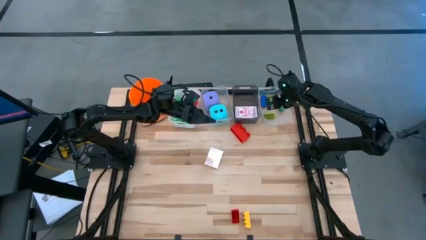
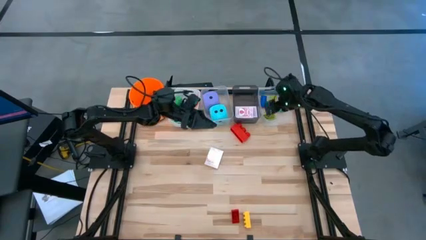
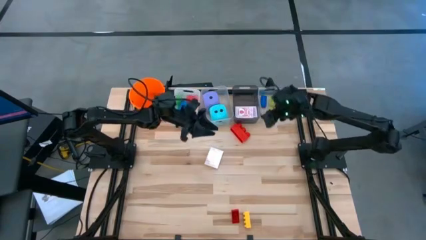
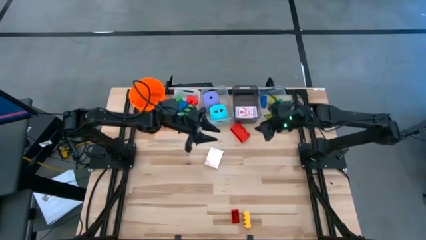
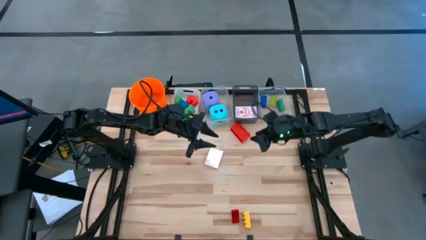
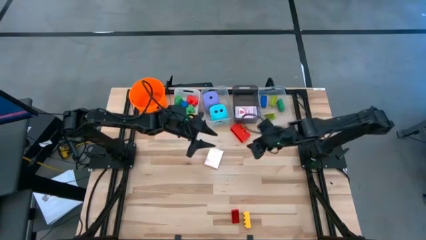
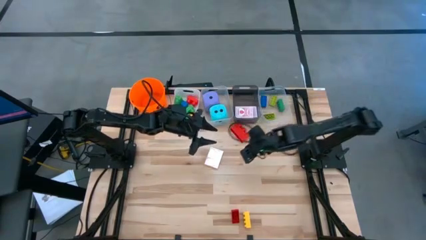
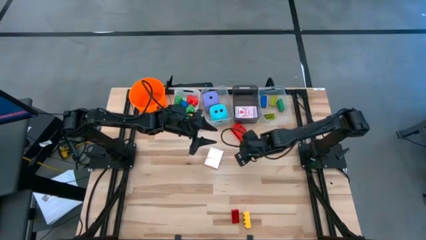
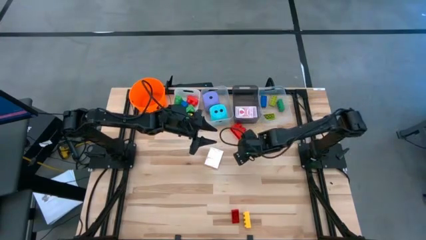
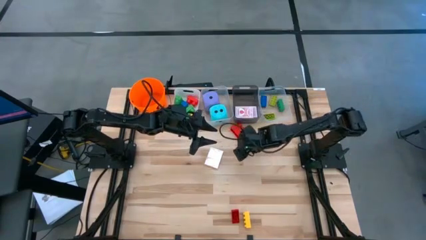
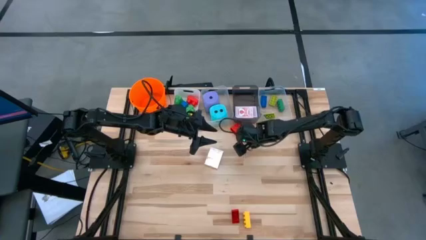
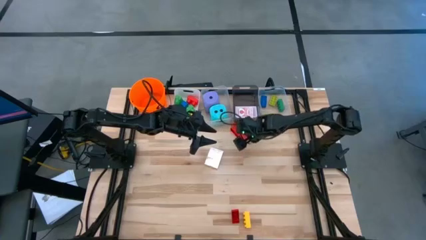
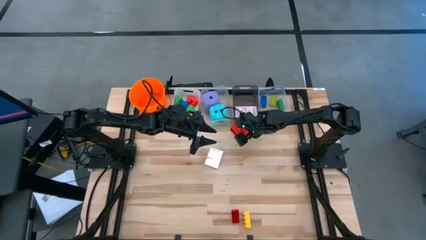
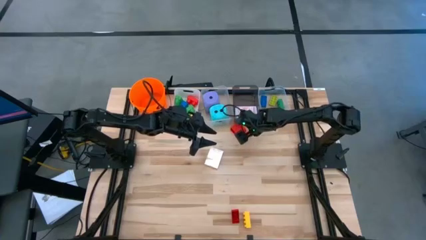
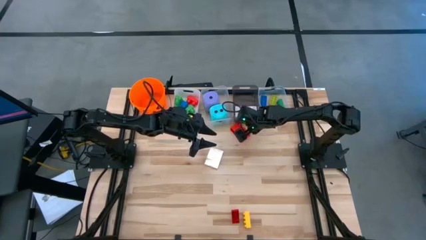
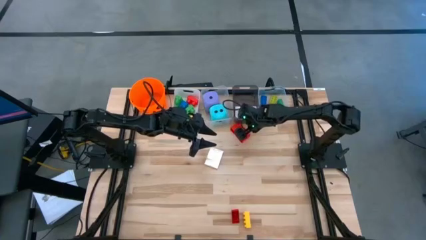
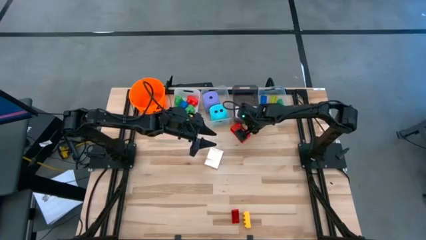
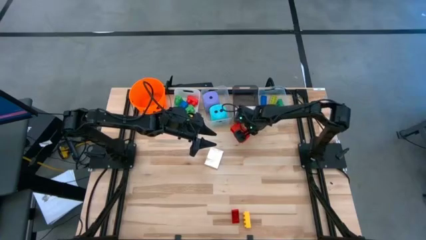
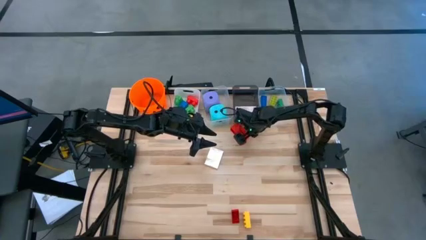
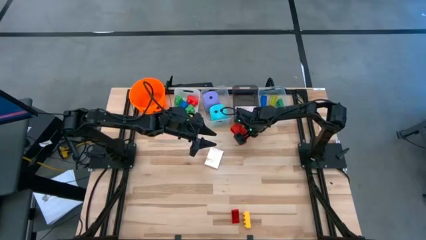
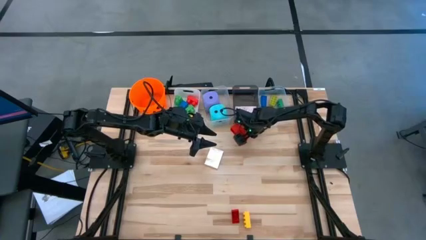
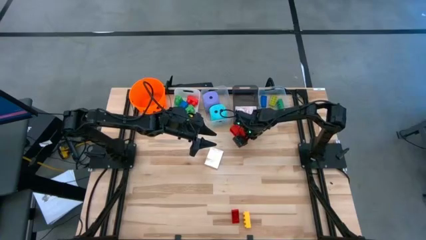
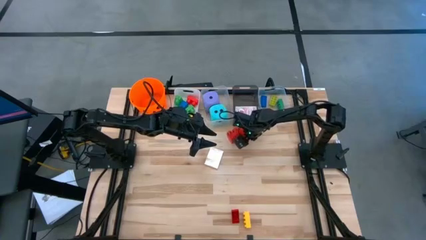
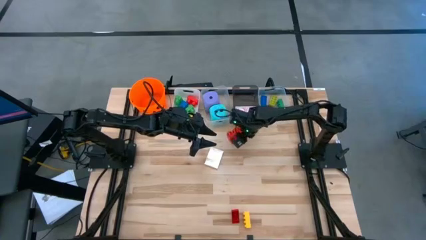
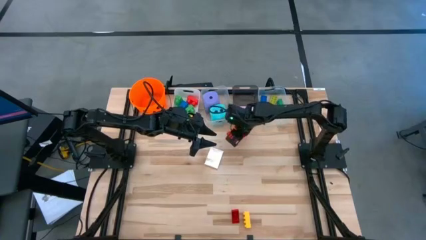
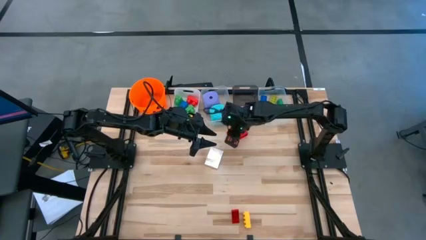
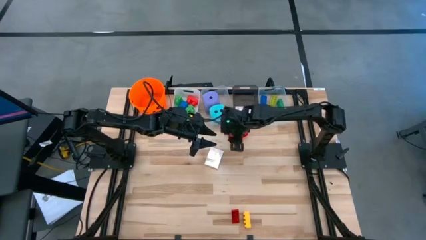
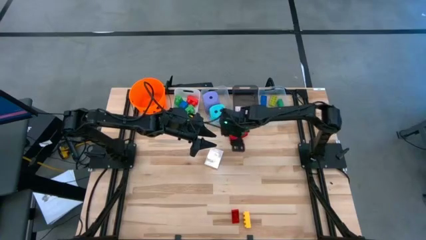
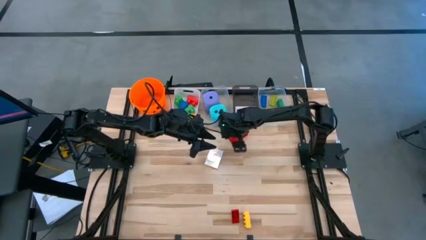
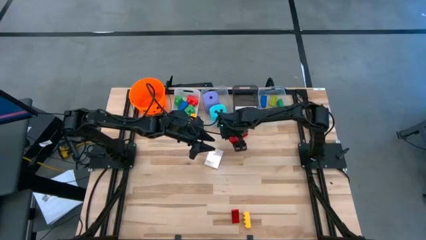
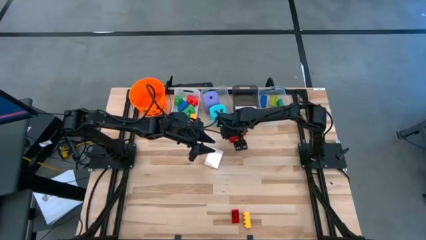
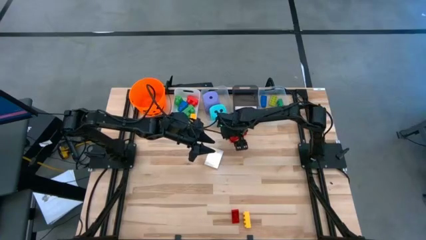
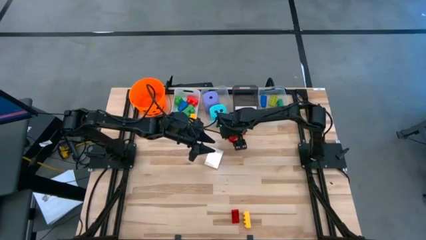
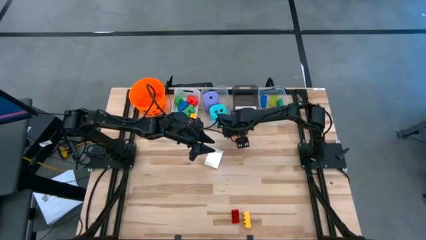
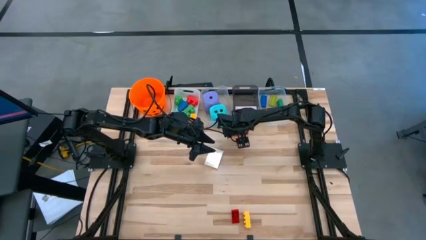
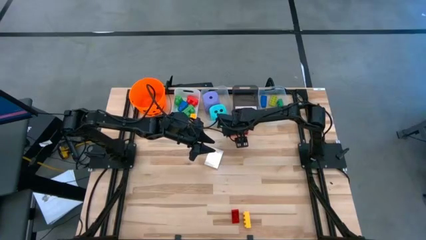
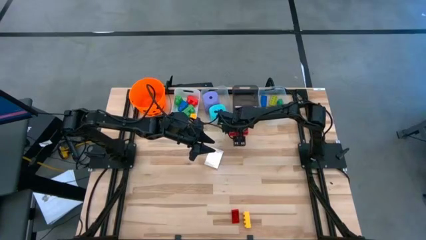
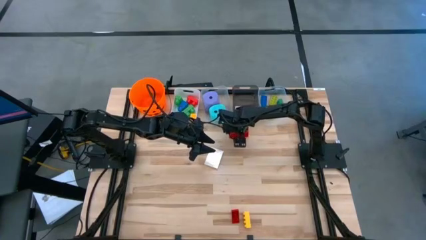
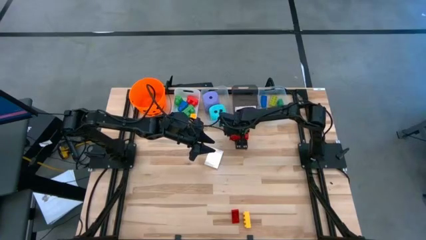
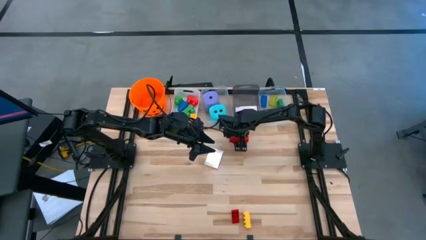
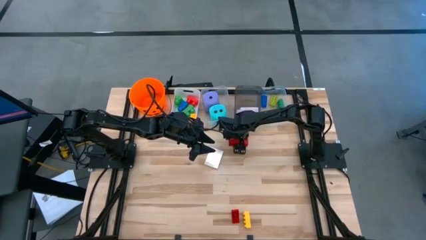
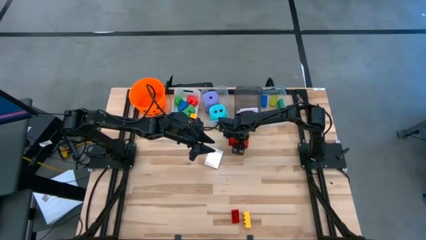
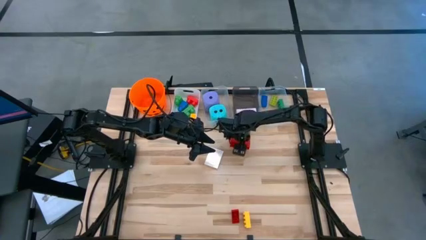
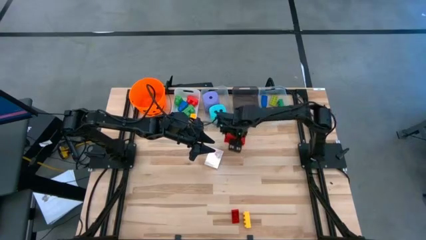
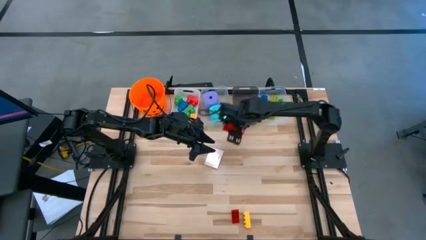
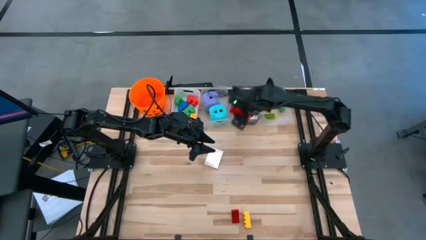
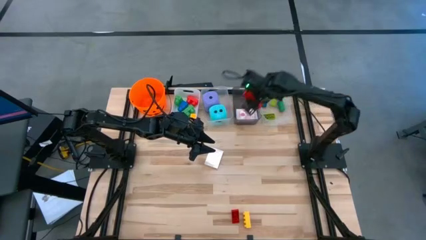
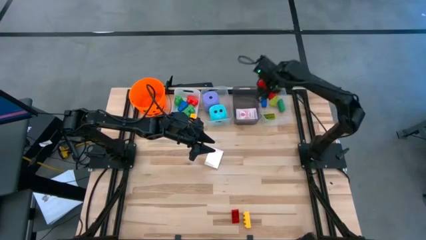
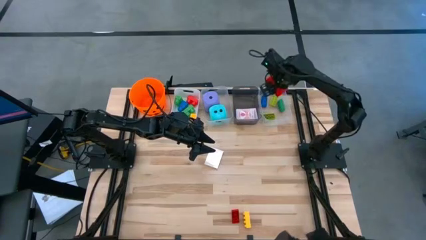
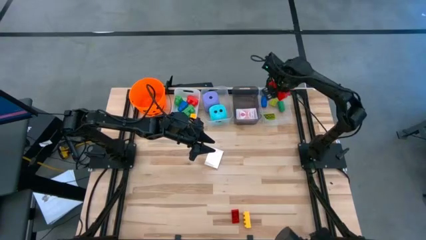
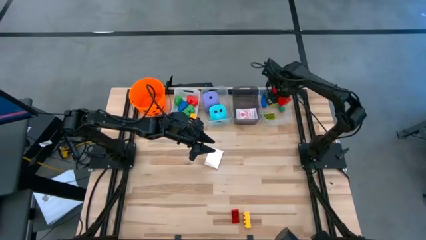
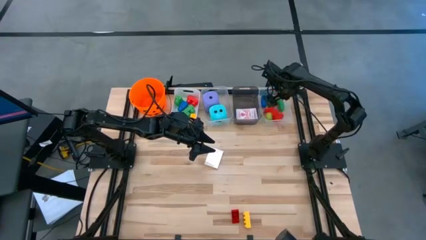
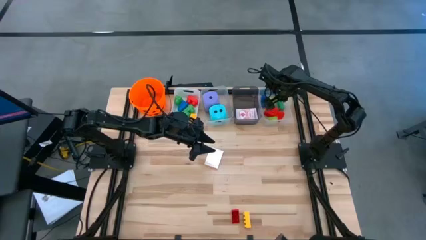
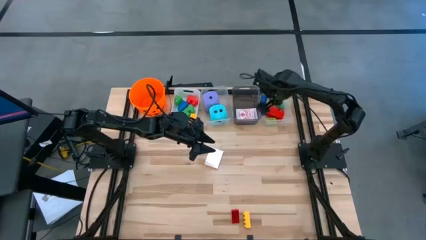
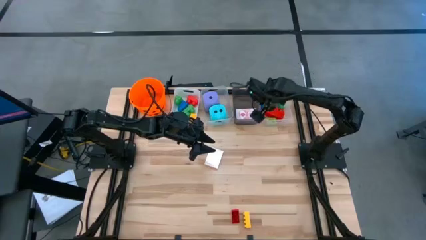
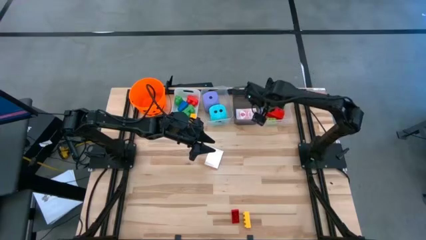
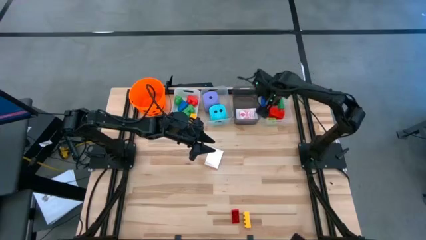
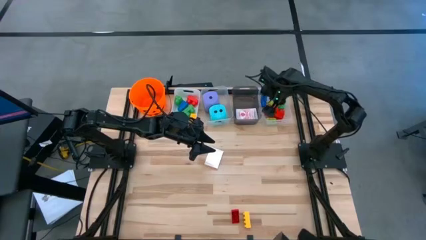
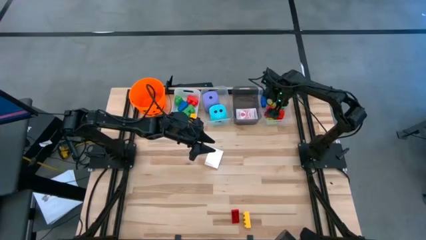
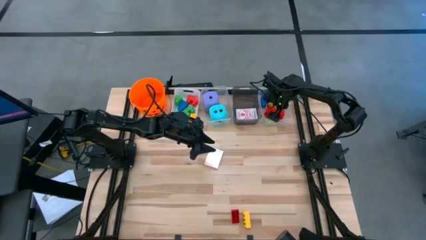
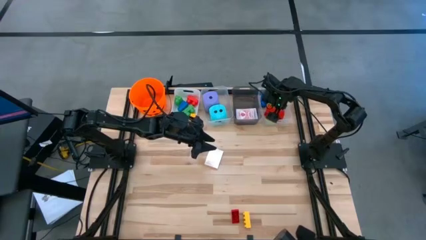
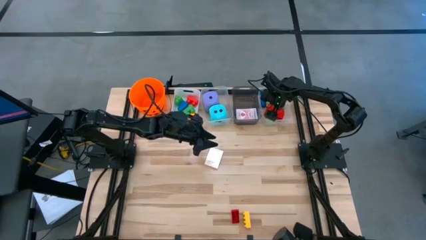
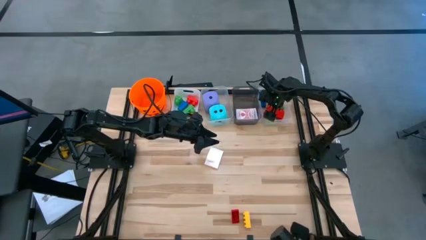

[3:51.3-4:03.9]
Task: Pick & Place Toys
Put the 3 stud red game piece into the white bin

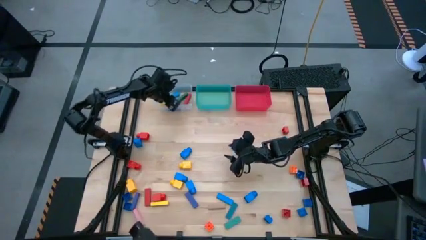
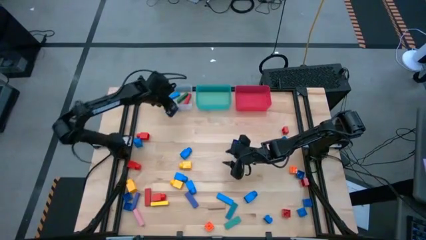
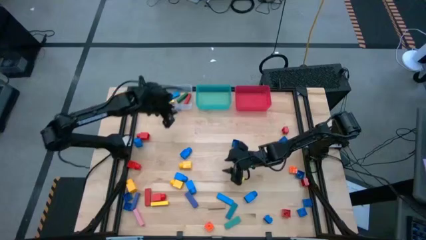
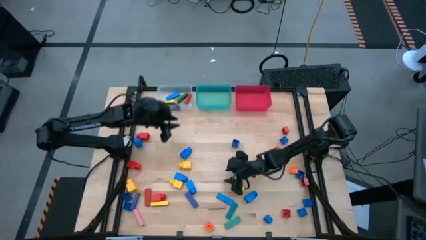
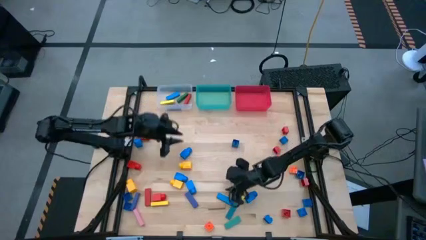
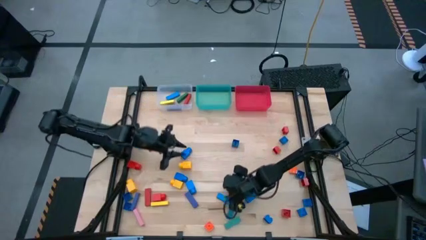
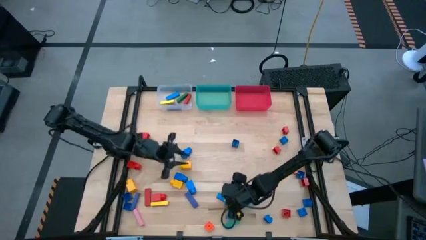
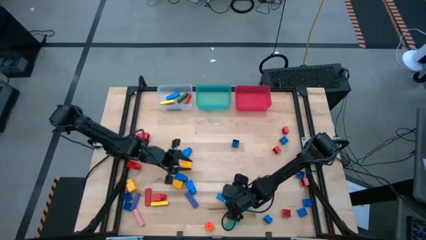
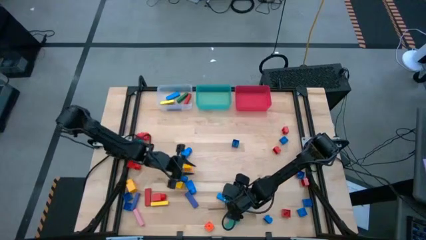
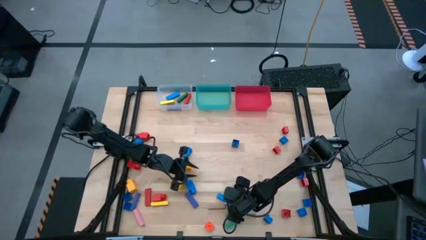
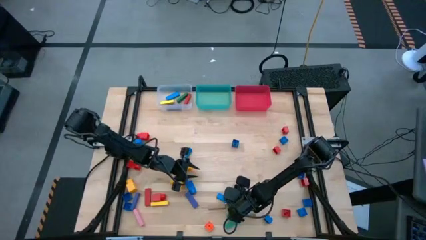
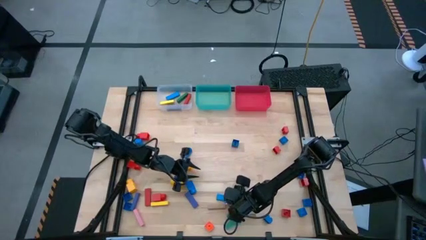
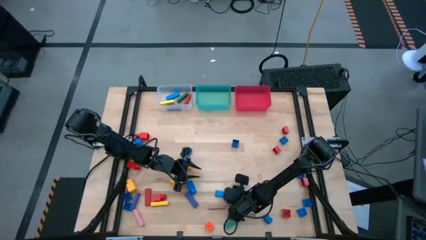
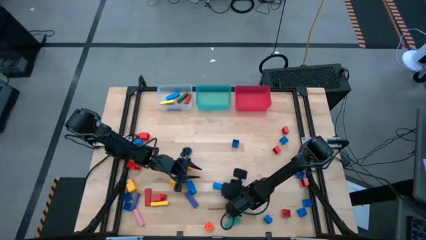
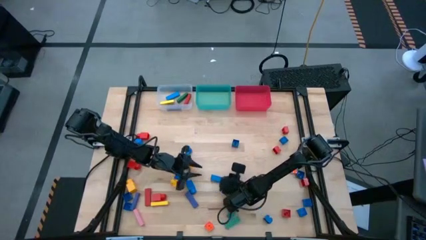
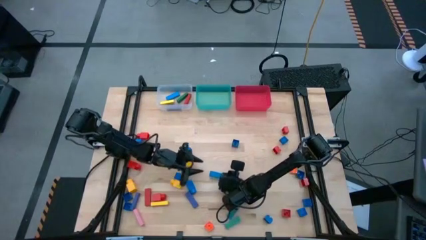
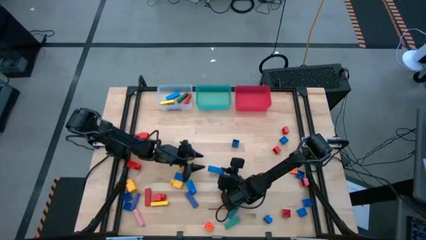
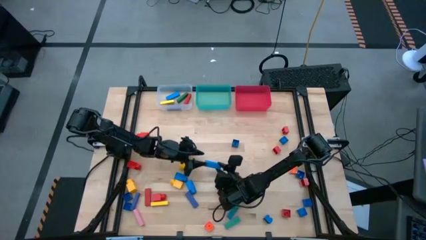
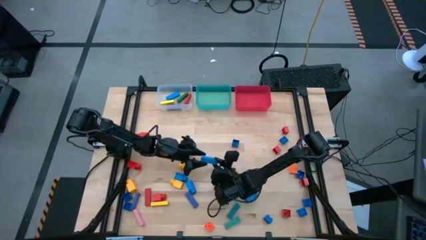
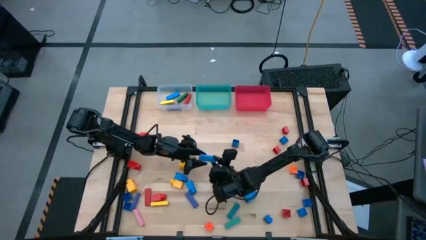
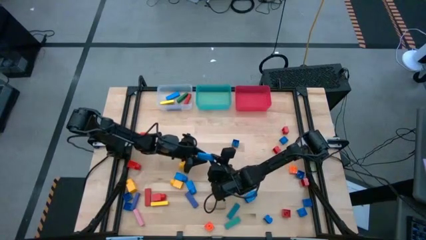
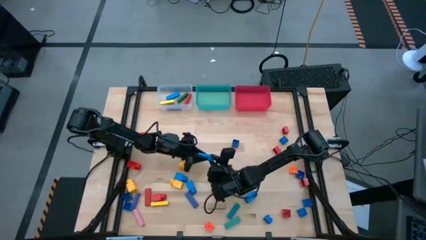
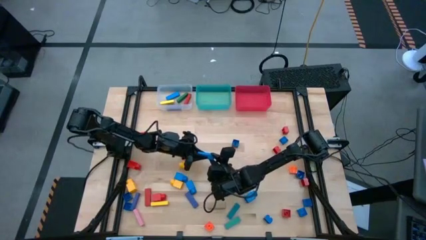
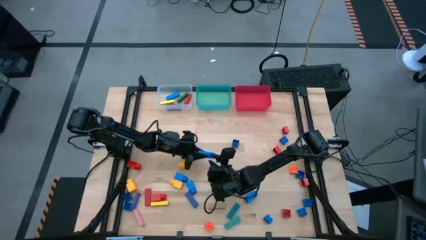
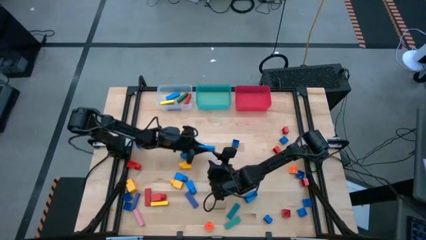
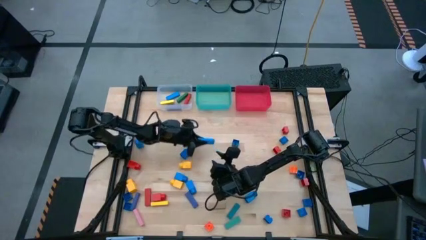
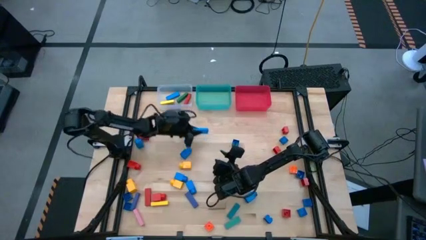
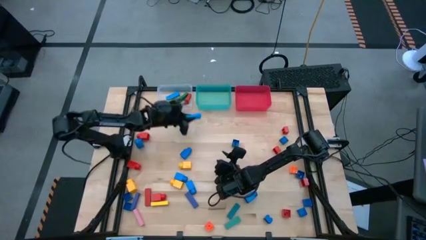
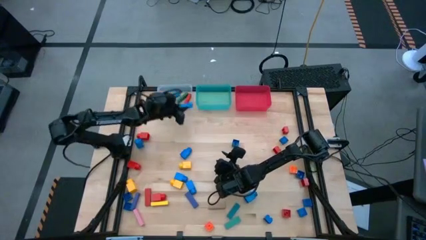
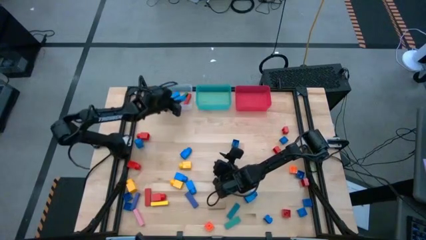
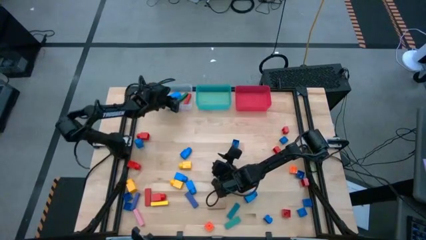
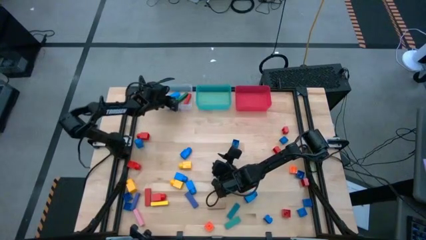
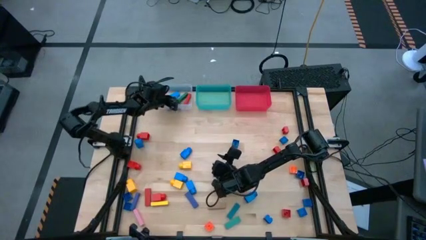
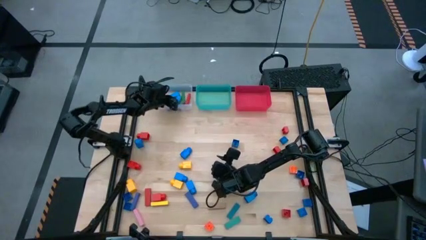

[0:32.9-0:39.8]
Task: Sort blocks by size
Put the blue block into the transparent bin
